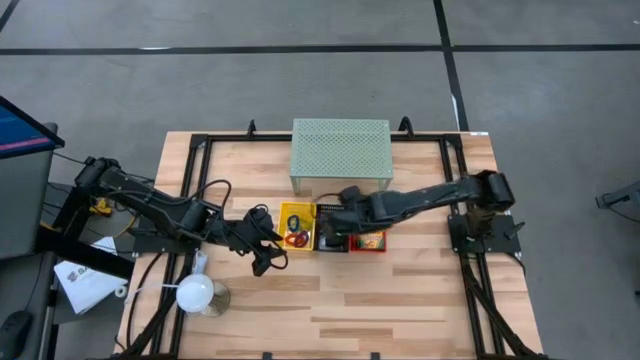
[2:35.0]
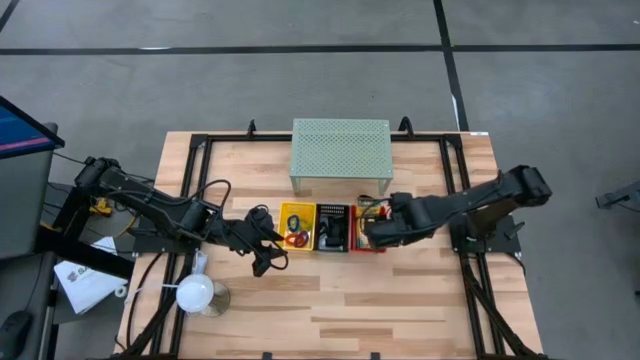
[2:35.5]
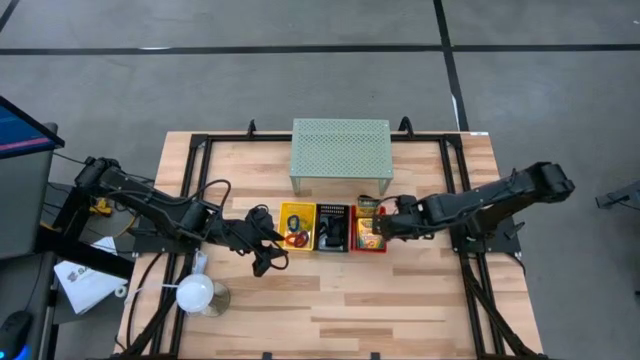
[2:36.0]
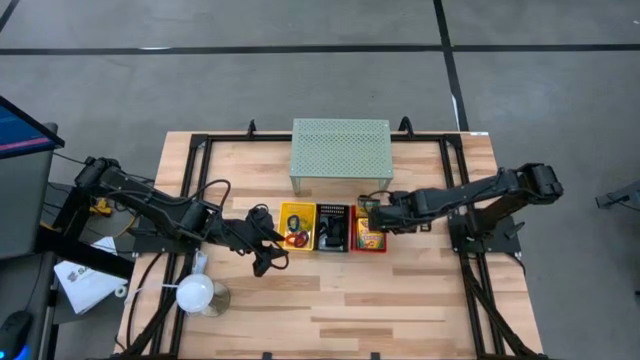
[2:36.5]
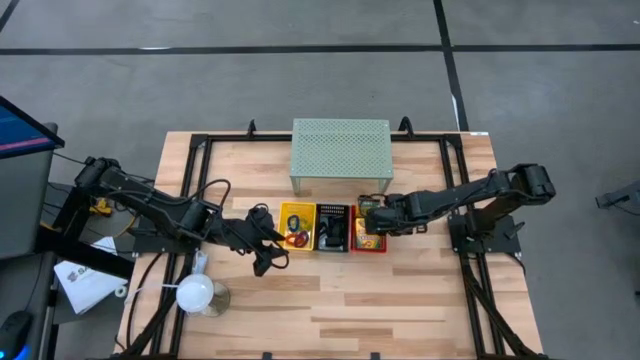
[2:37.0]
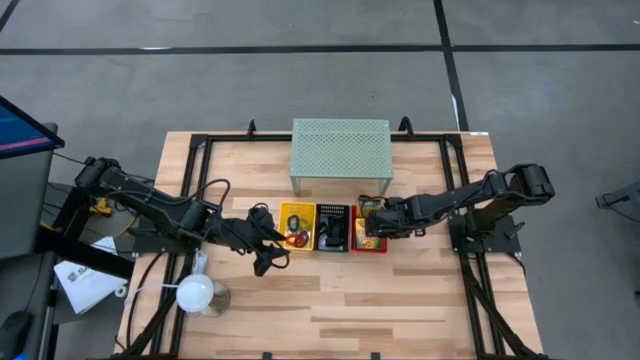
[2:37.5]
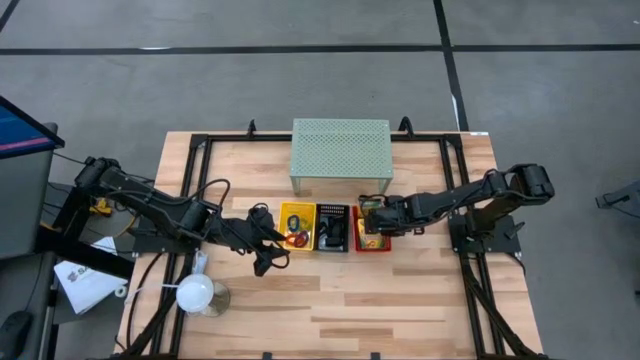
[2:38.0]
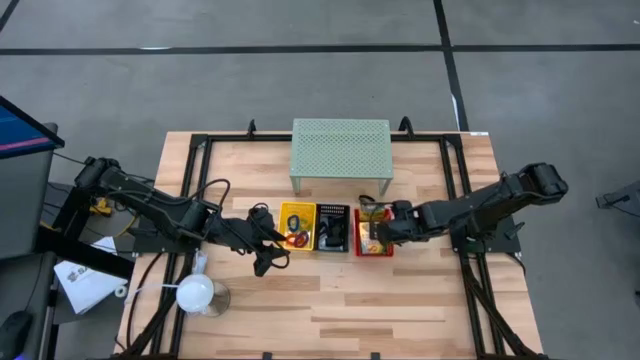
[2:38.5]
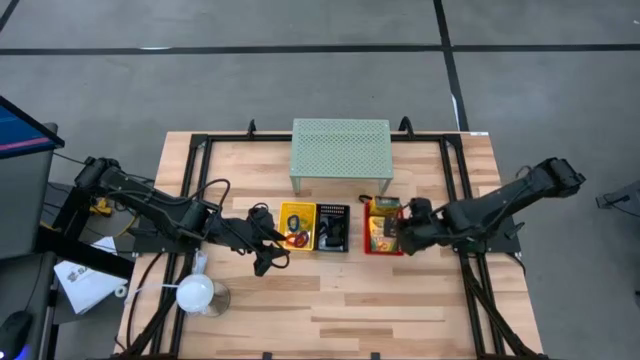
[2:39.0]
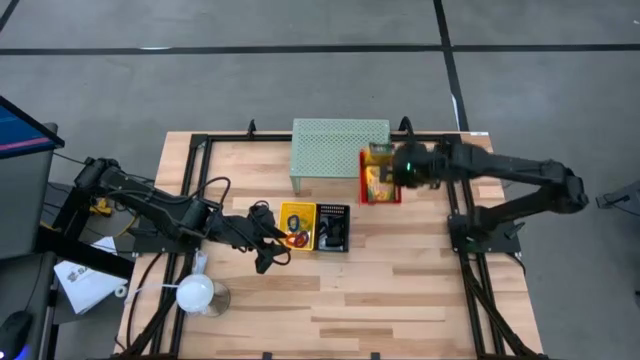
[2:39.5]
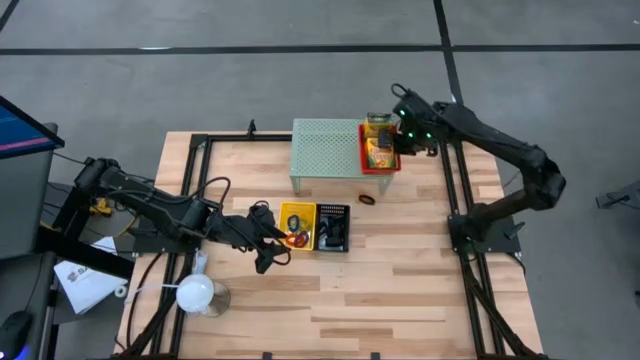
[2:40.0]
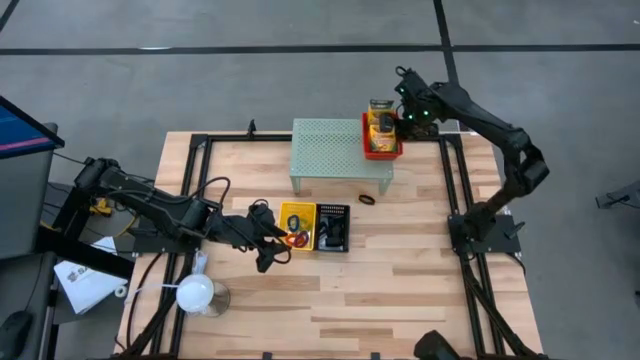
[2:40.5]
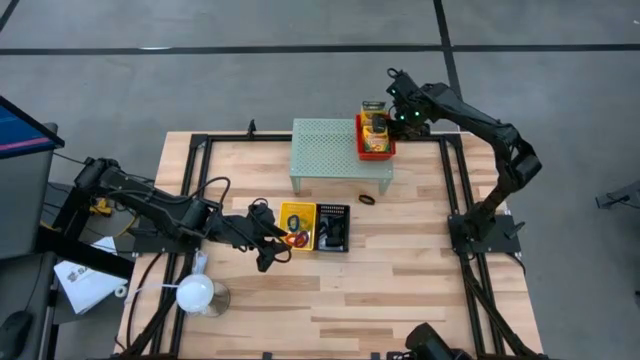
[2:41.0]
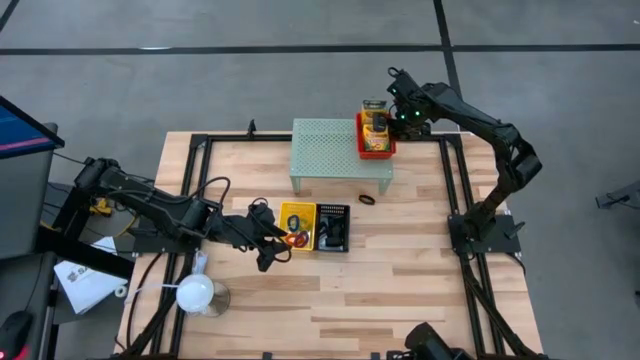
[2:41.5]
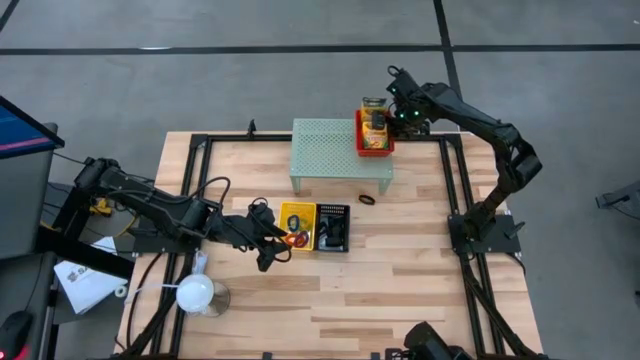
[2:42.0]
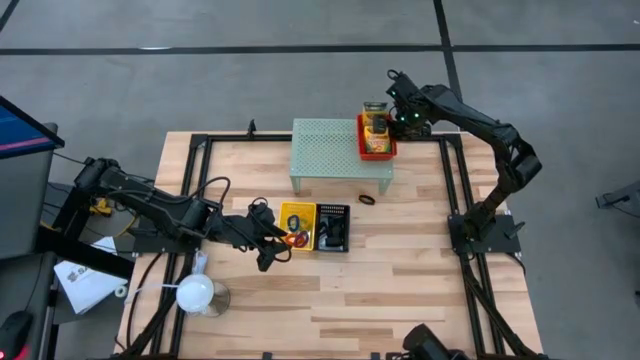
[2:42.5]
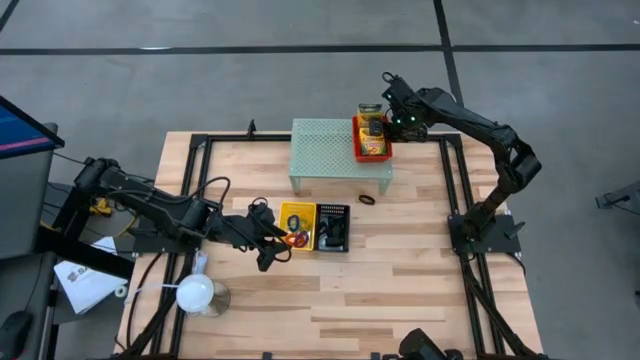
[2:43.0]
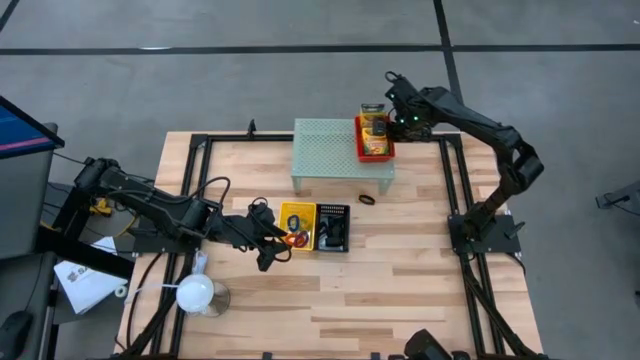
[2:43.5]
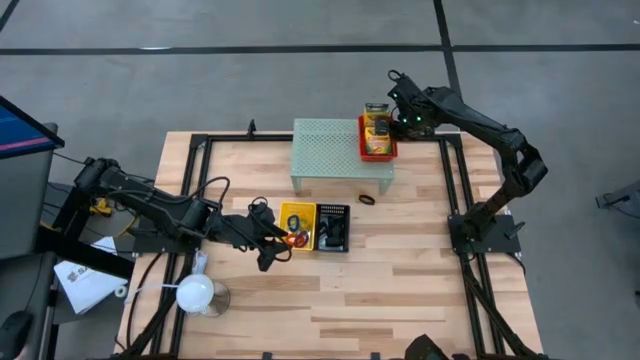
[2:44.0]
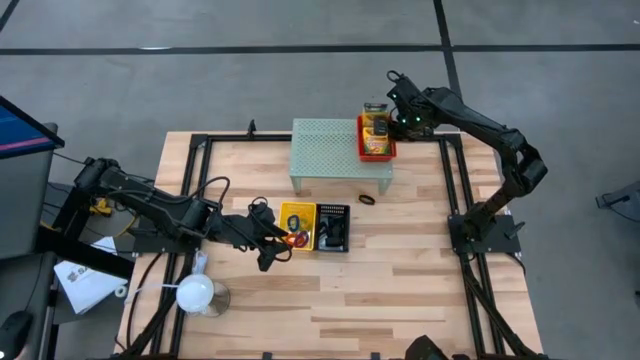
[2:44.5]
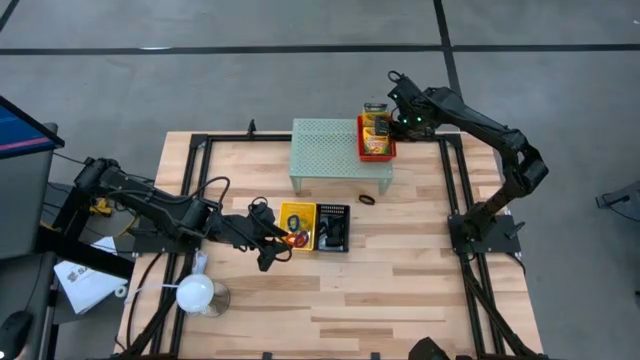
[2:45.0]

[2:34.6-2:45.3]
Task: Pick & Place Office Desk Supplies
Put the red bin on the shelf

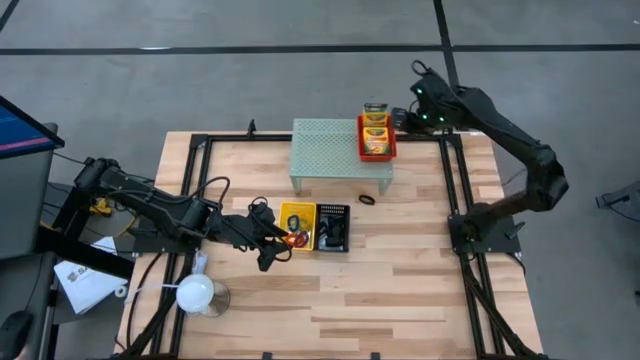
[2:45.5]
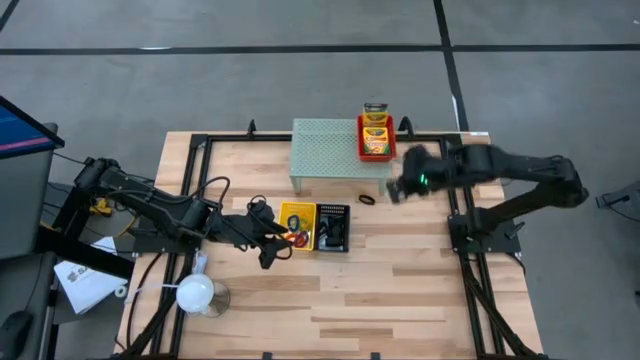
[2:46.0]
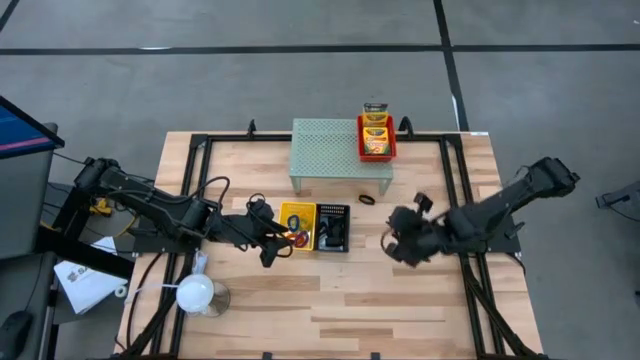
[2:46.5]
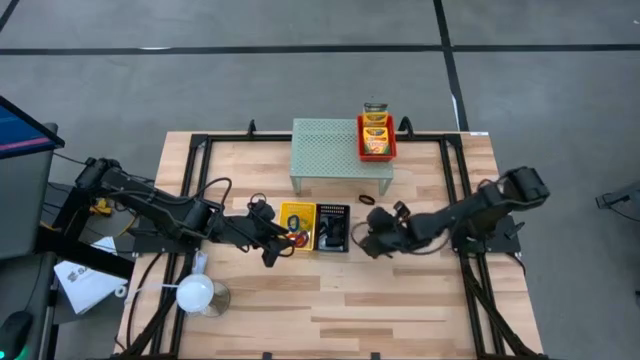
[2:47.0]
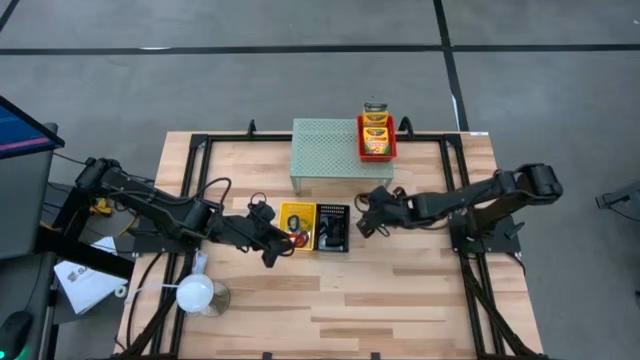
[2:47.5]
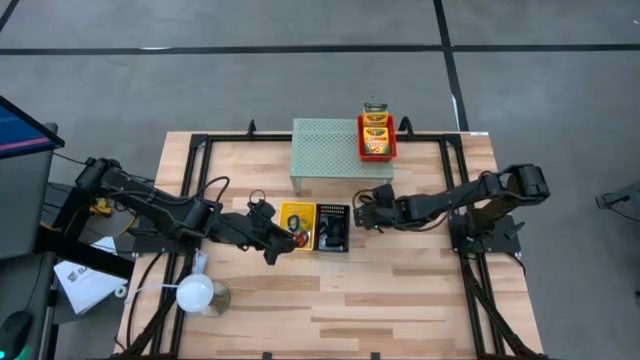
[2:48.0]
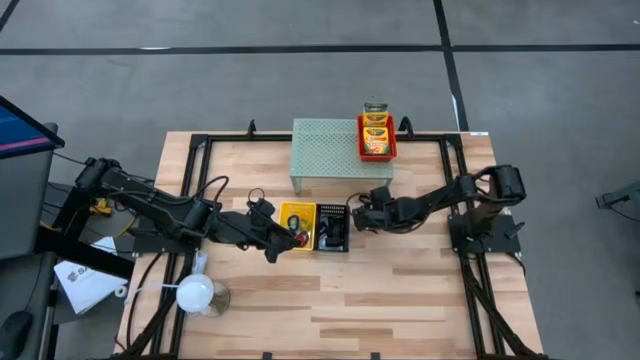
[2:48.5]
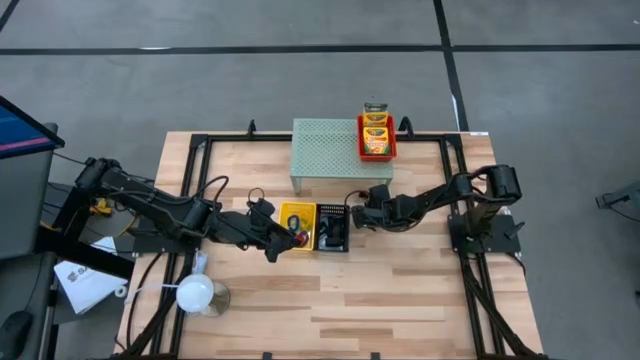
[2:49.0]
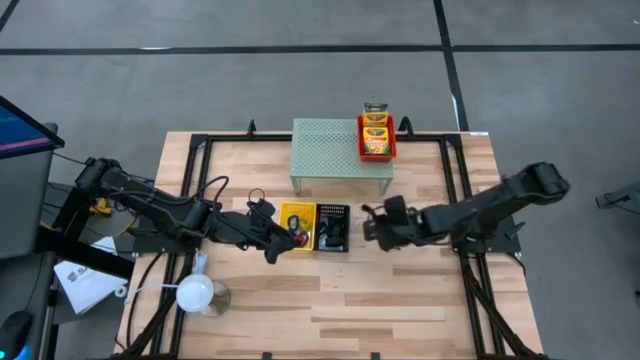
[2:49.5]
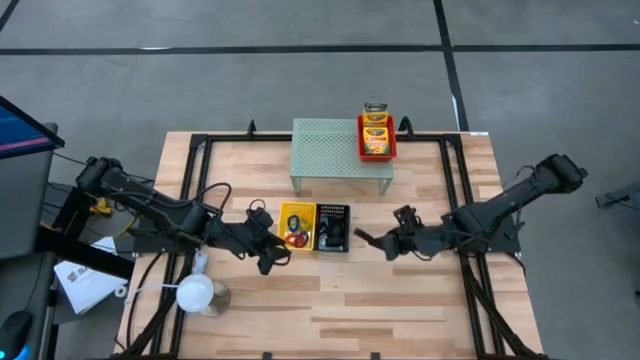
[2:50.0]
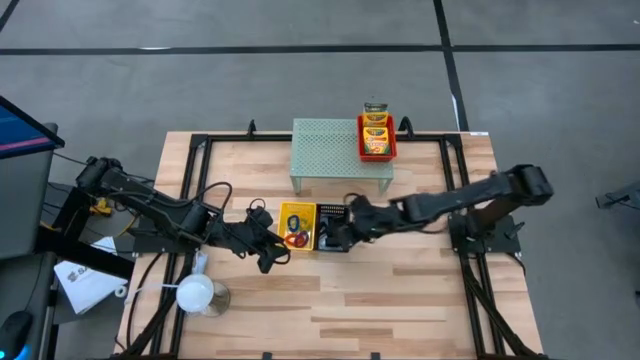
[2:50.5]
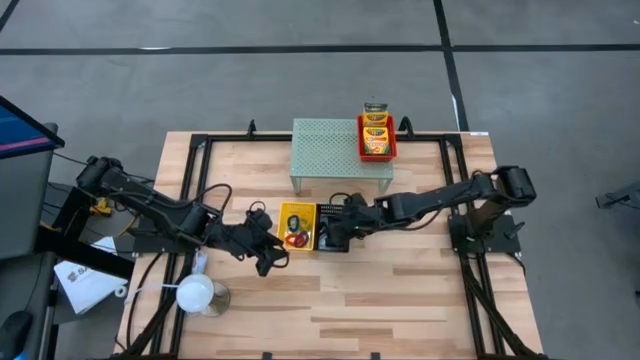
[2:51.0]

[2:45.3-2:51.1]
Put the black rubber band into the black bin

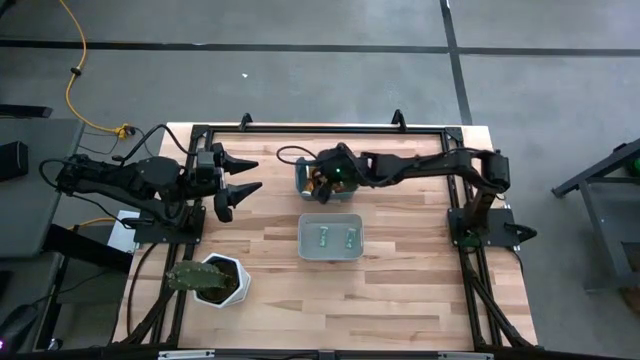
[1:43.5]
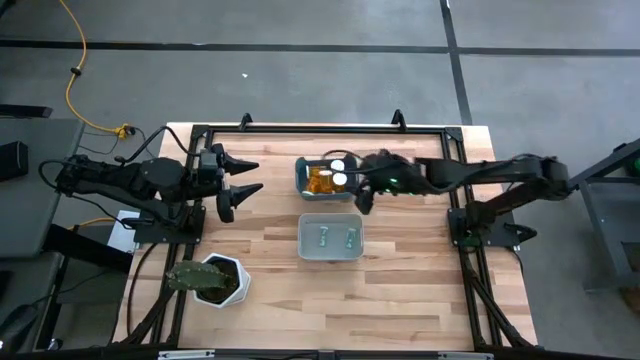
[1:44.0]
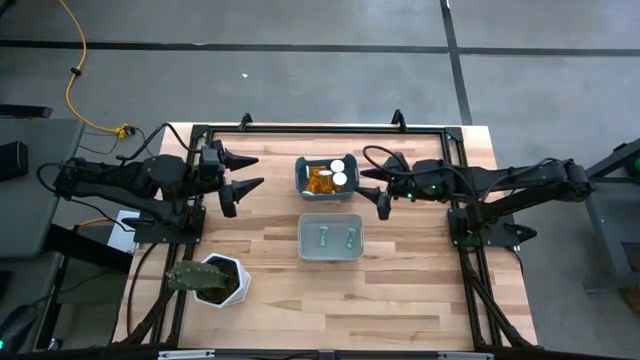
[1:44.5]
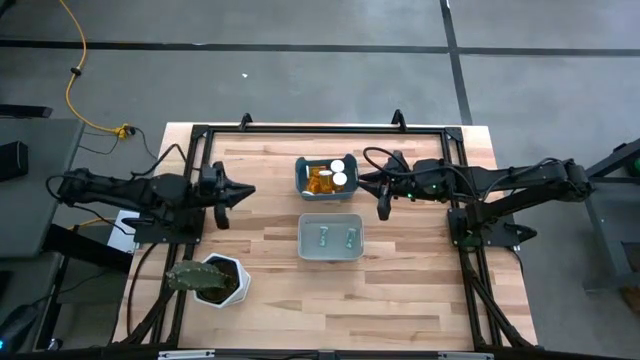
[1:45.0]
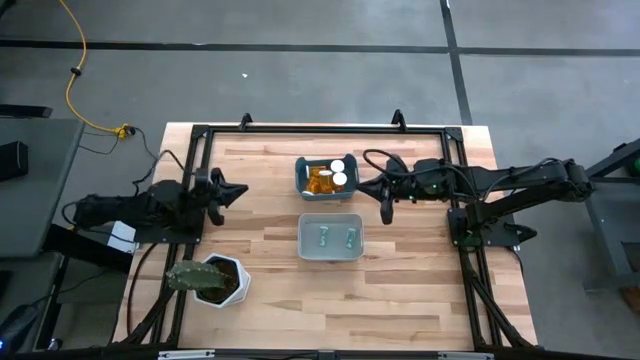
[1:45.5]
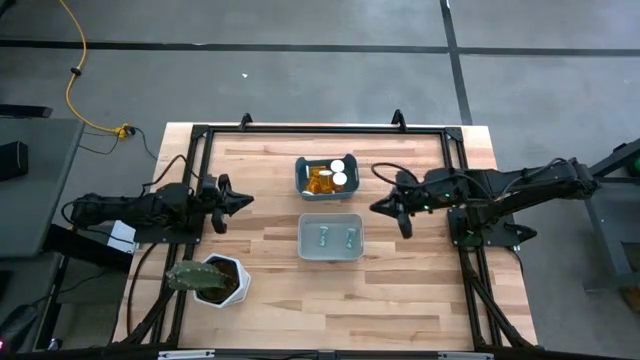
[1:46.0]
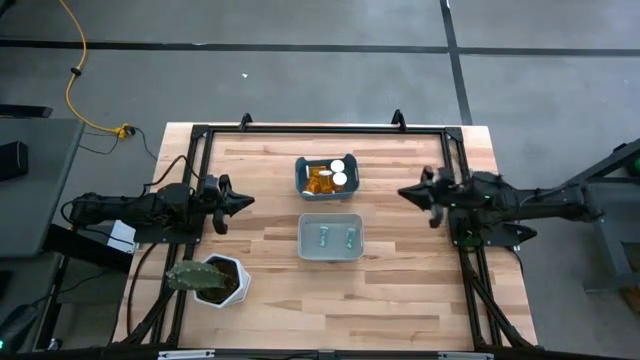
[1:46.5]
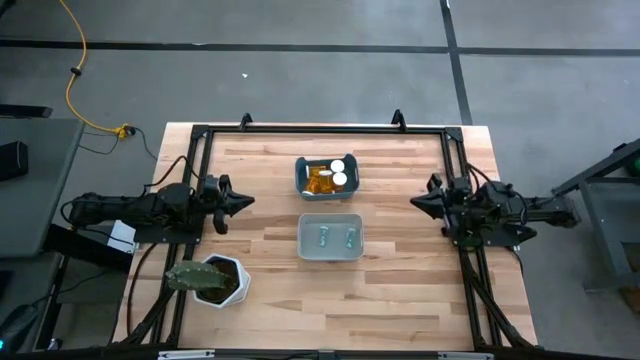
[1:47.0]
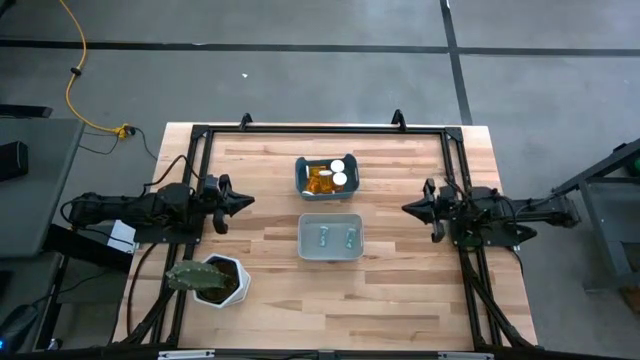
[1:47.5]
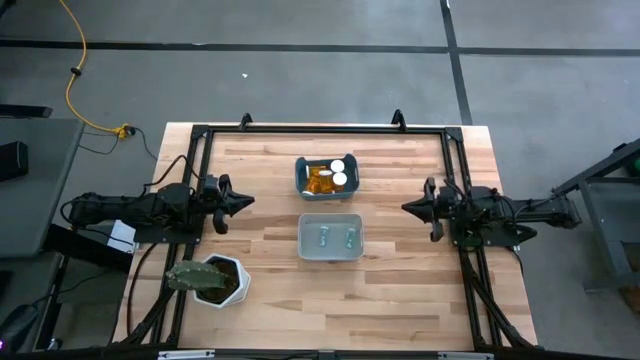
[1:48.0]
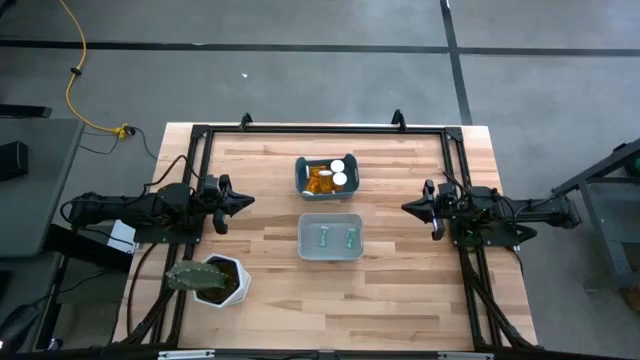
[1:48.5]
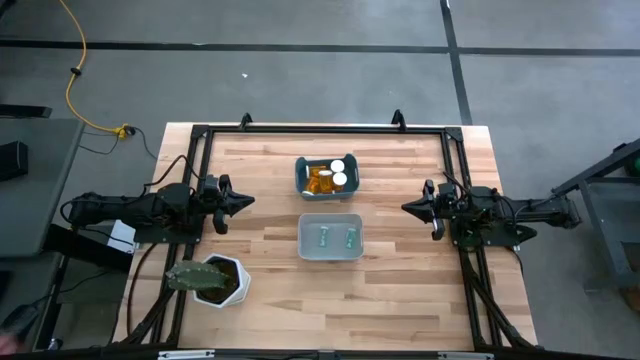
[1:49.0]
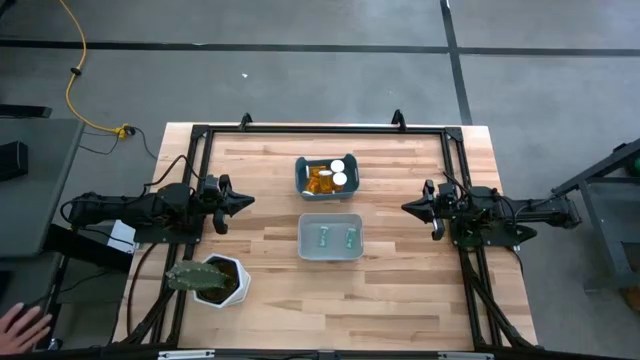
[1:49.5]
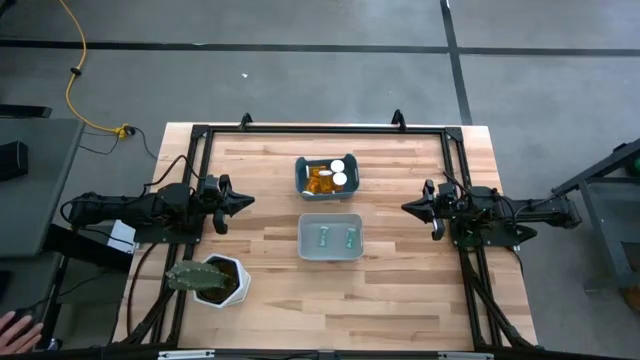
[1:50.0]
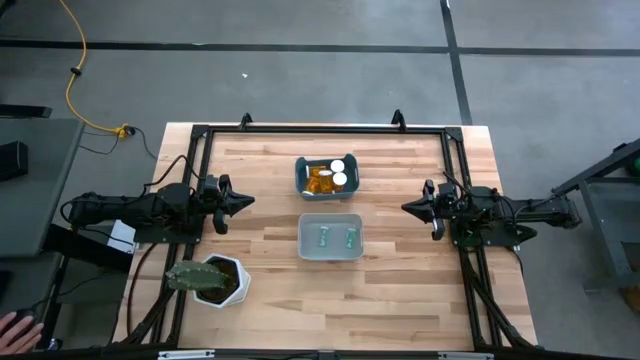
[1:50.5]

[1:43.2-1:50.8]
Task: Pick and place medicine bottles into bin by pill shape (circle, oval)
Return to Home Position
